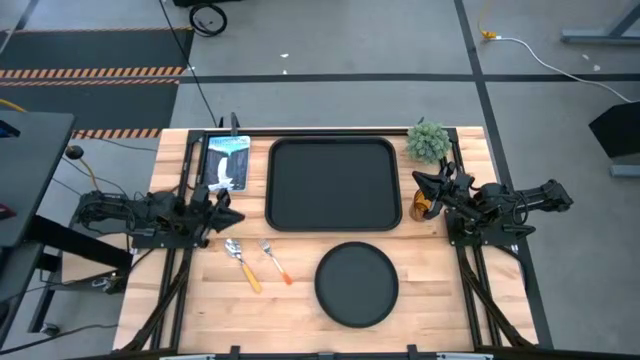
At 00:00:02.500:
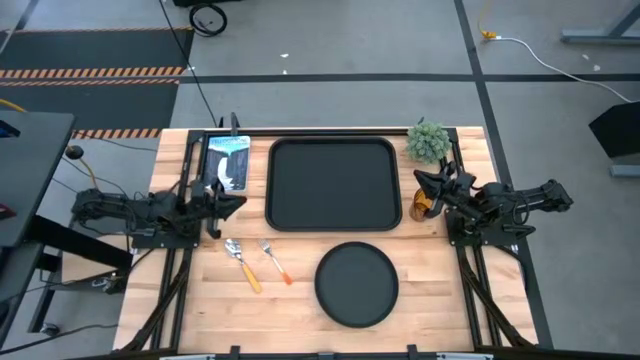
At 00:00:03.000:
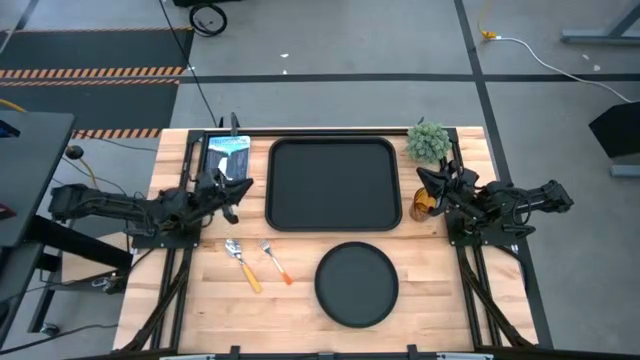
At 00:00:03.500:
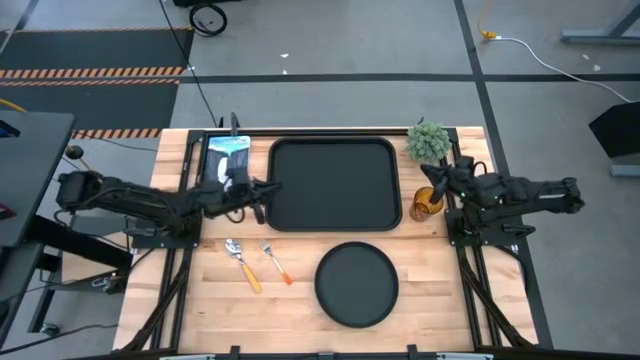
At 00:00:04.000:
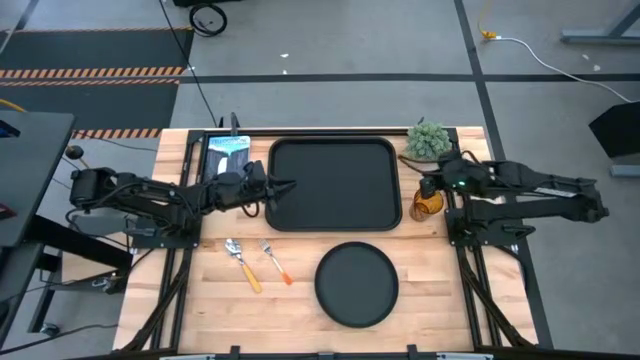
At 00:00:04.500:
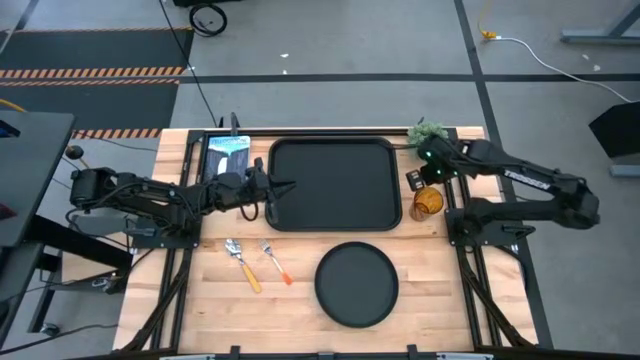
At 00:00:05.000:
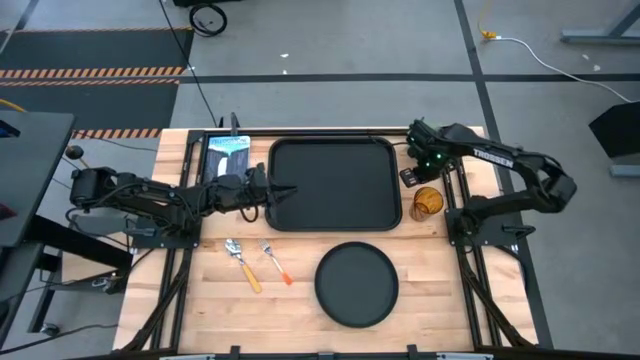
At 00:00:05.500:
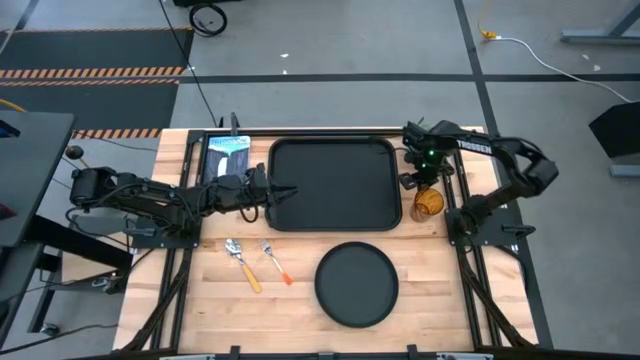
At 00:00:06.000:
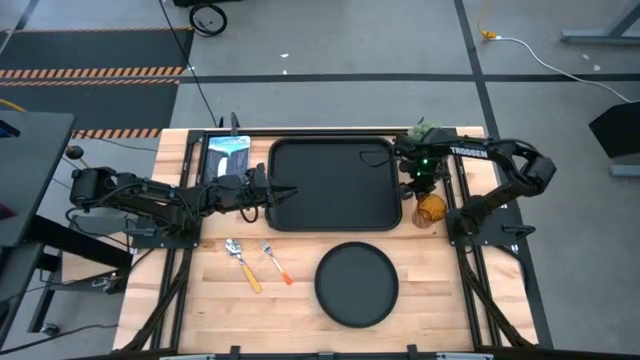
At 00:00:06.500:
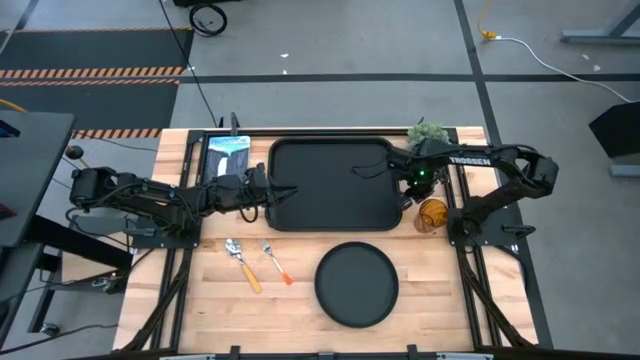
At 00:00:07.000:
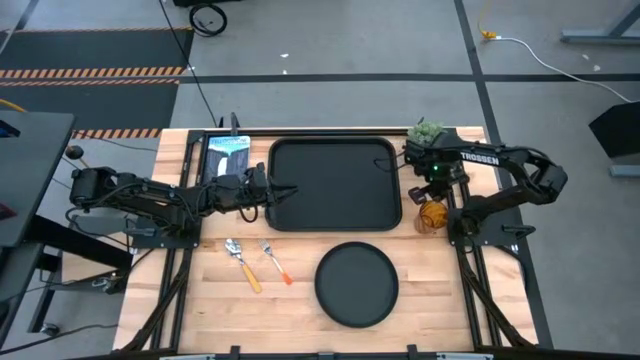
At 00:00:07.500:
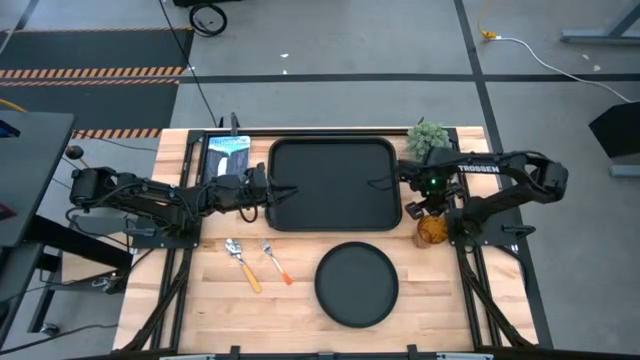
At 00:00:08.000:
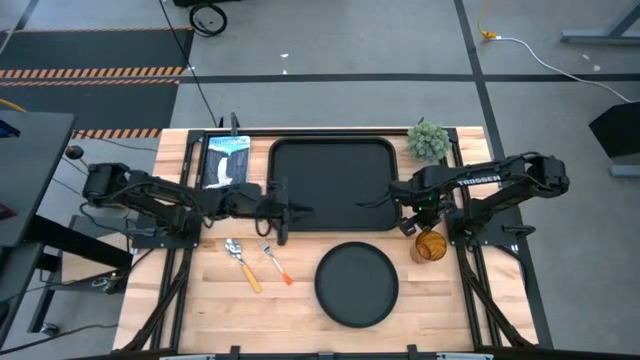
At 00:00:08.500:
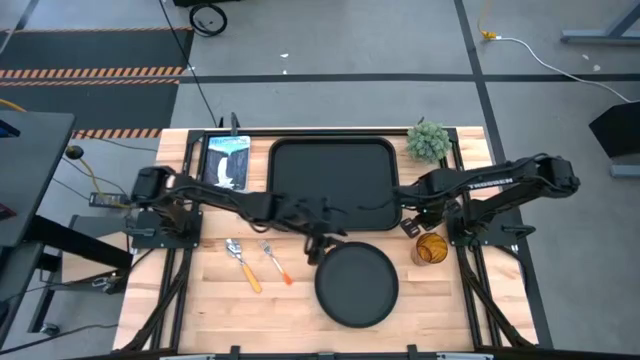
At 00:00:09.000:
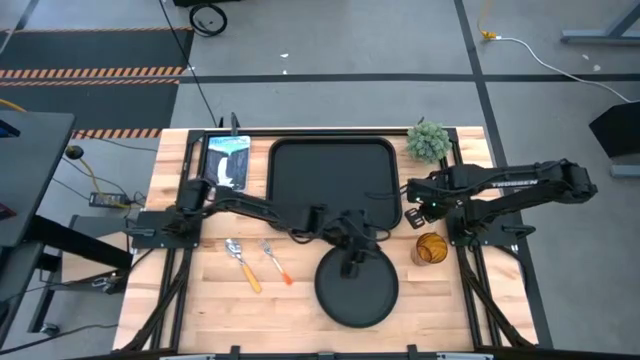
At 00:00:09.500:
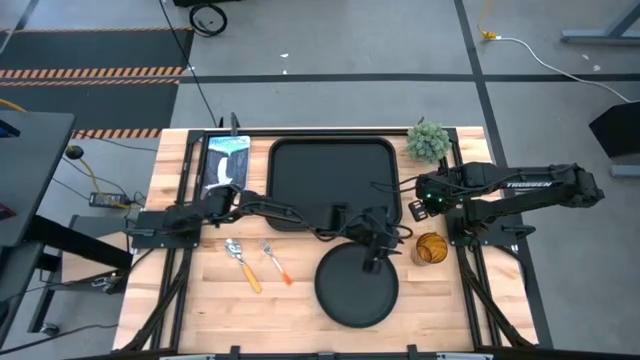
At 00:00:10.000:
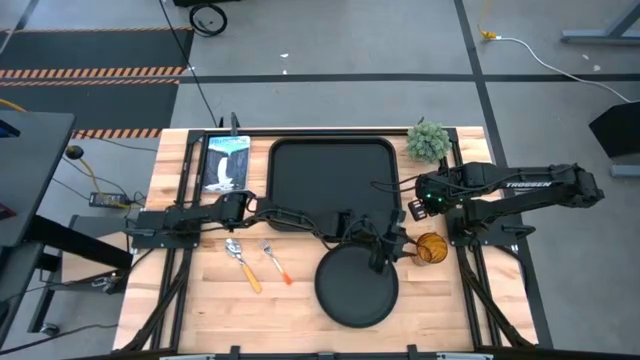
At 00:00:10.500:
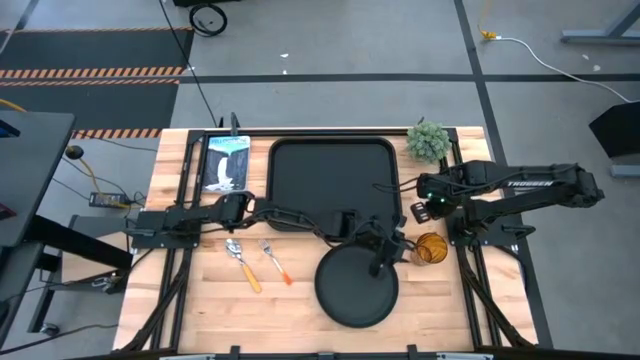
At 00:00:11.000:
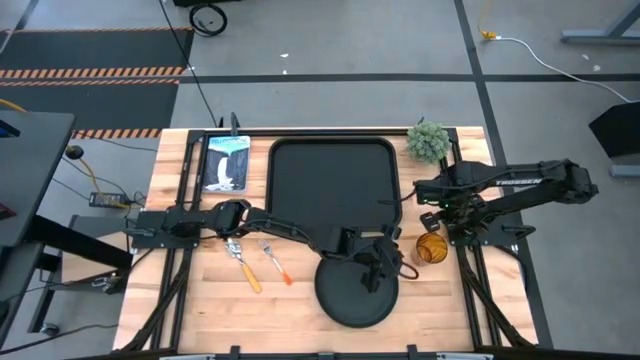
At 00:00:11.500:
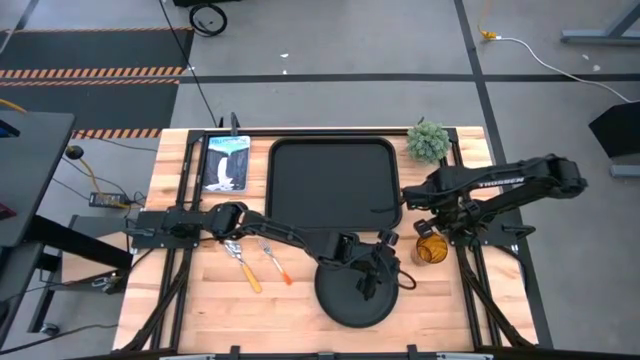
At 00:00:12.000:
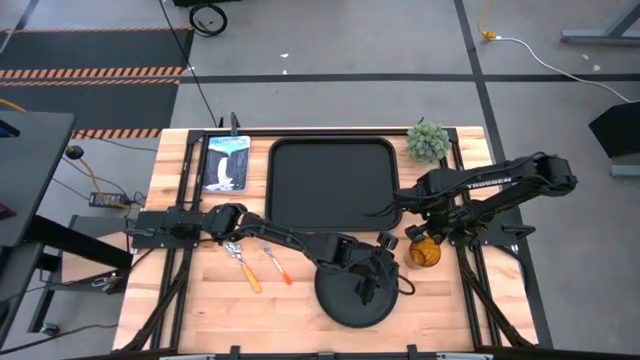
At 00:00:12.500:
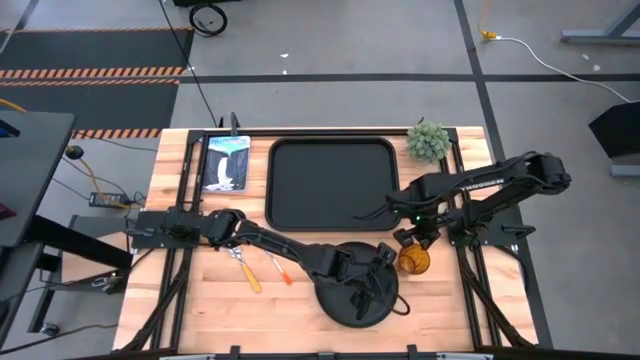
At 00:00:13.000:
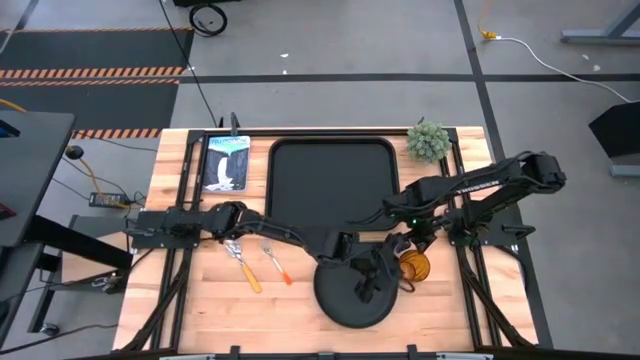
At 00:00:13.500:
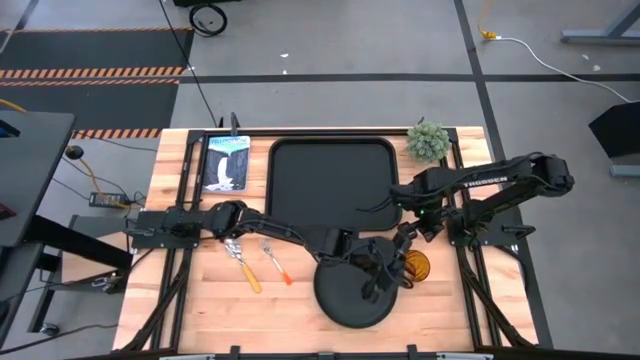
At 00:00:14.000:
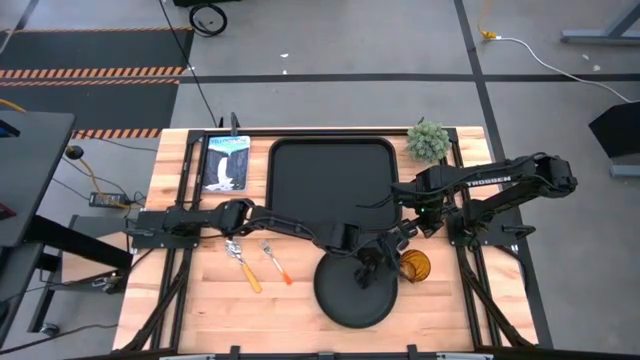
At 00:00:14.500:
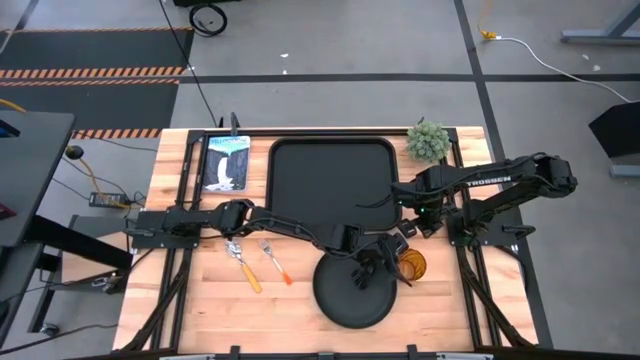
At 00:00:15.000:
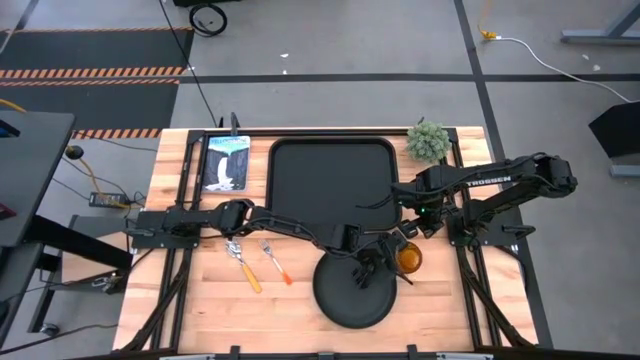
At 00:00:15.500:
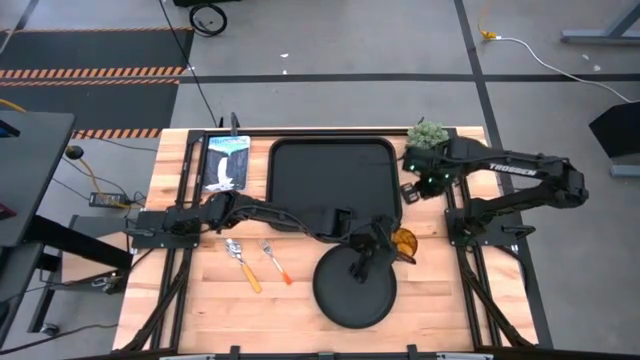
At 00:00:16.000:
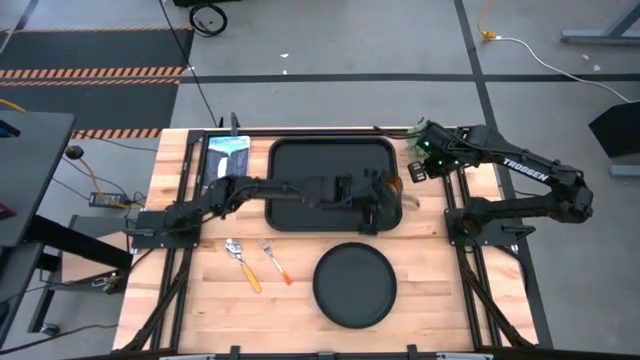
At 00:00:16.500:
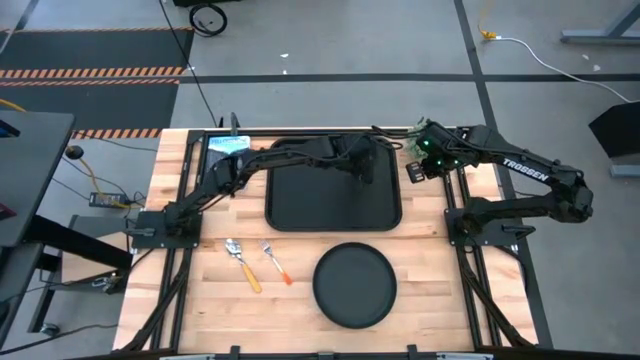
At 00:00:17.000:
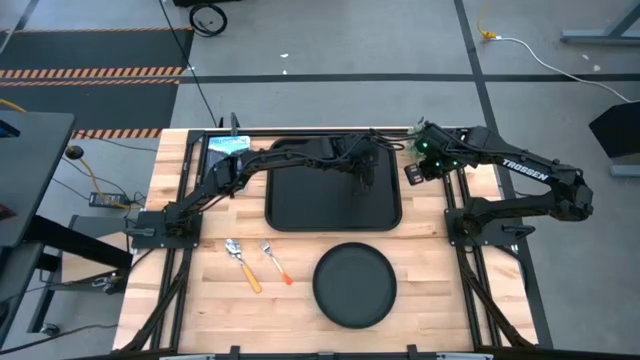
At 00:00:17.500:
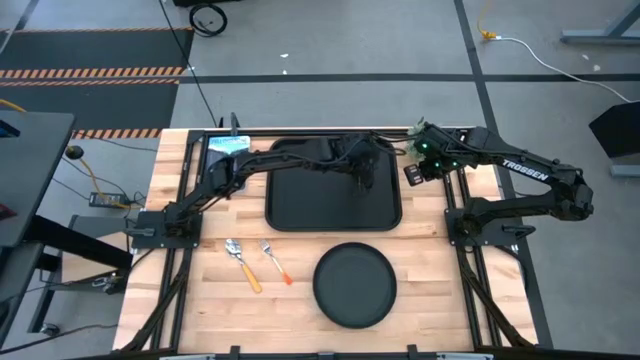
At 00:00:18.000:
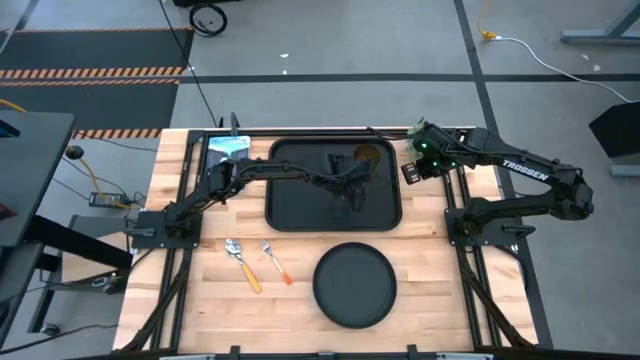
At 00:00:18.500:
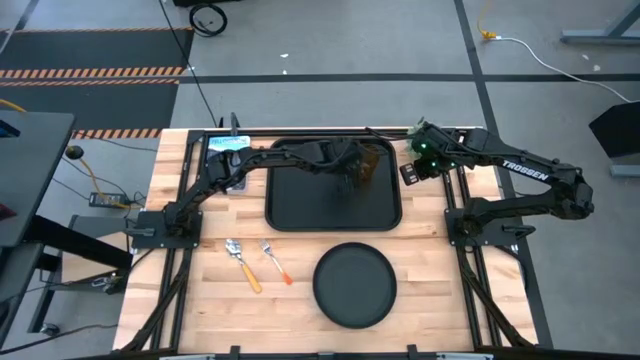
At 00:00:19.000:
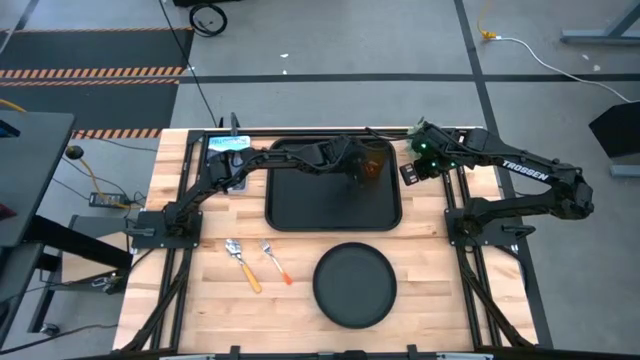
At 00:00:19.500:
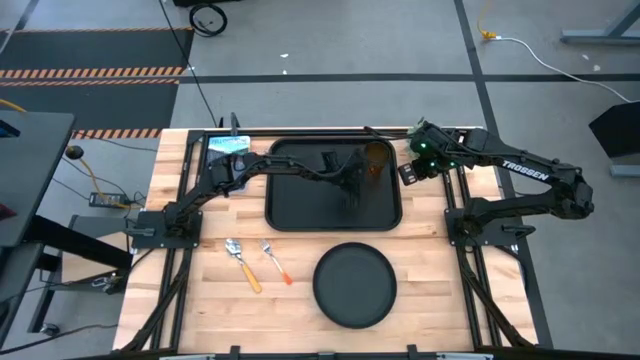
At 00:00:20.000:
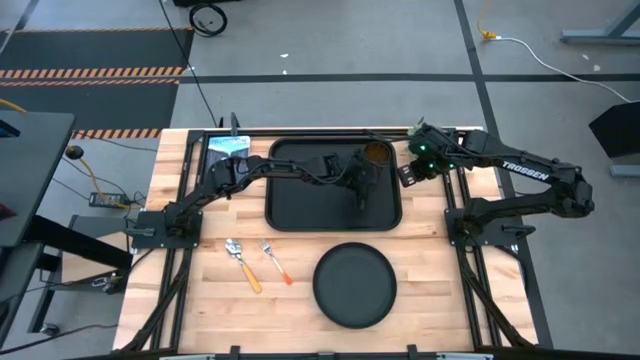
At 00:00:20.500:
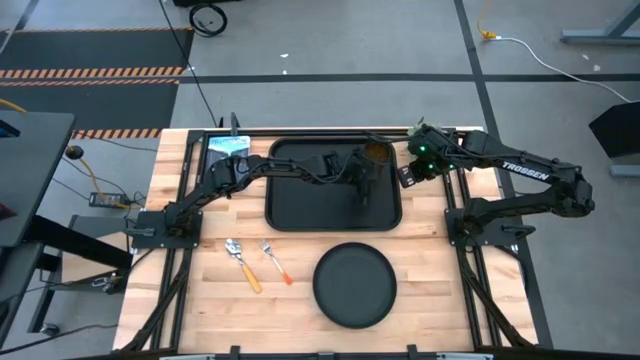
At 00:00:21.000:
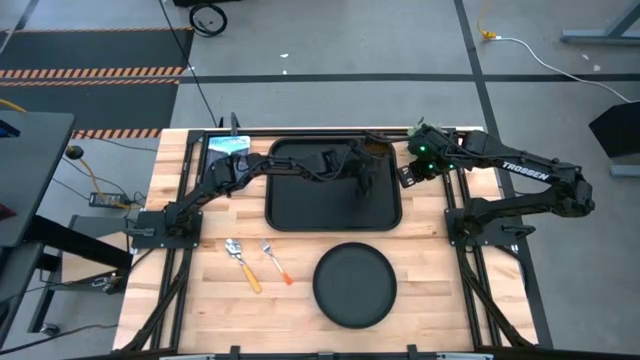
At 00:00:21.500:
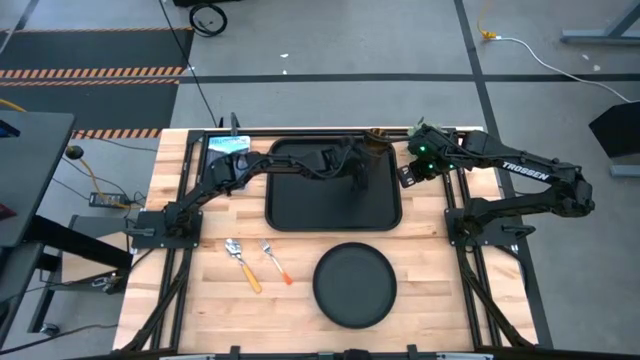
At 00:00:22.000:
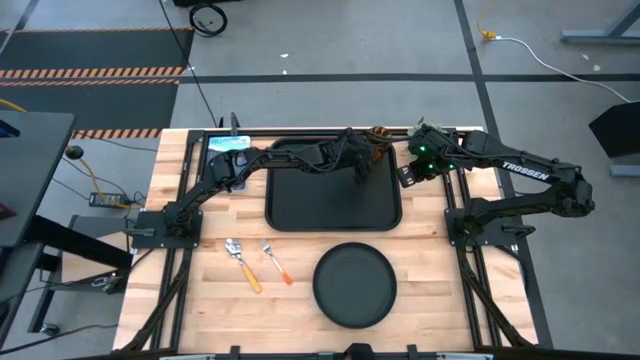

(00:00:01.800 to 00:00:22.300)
Task: Pick and place plate/cup/fork/spoon on tray
Put the orange cup on the top right of the black tray
